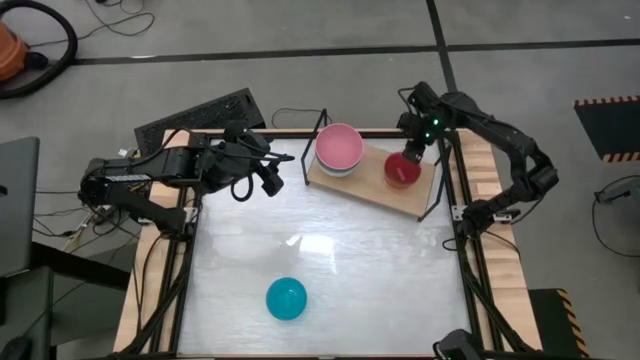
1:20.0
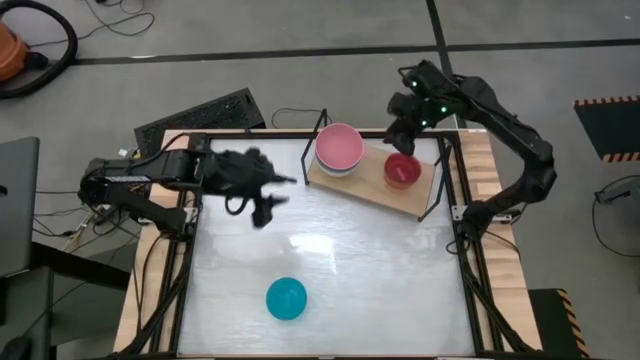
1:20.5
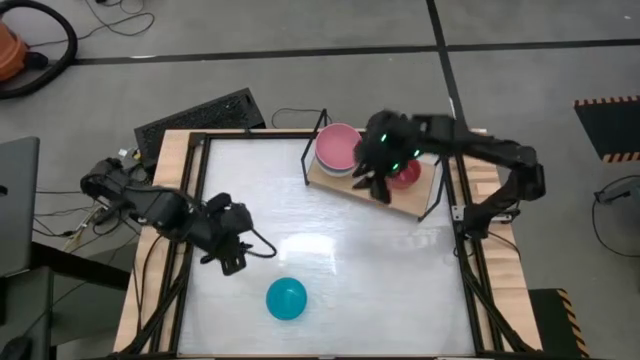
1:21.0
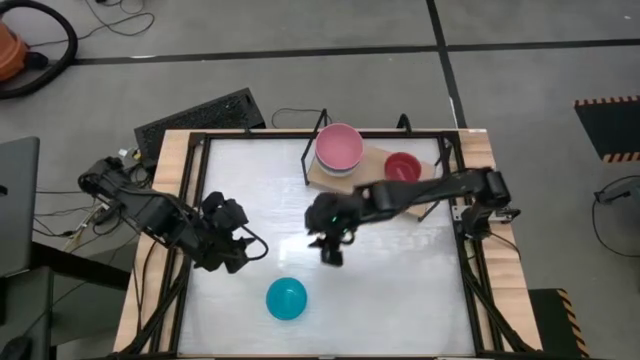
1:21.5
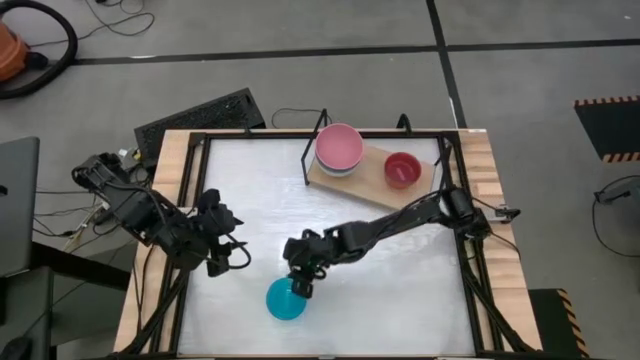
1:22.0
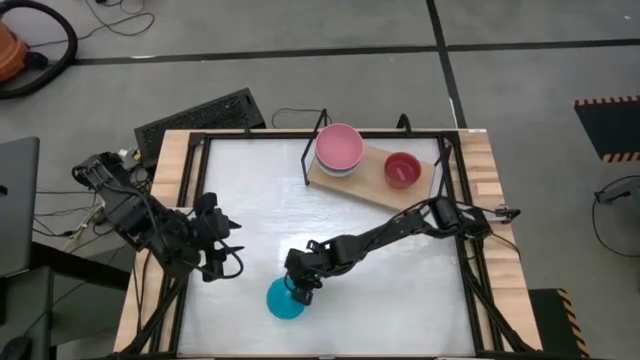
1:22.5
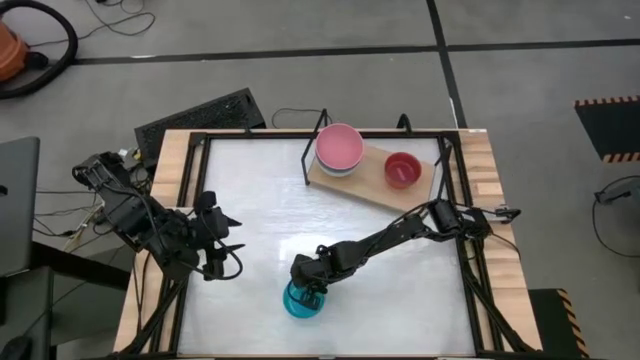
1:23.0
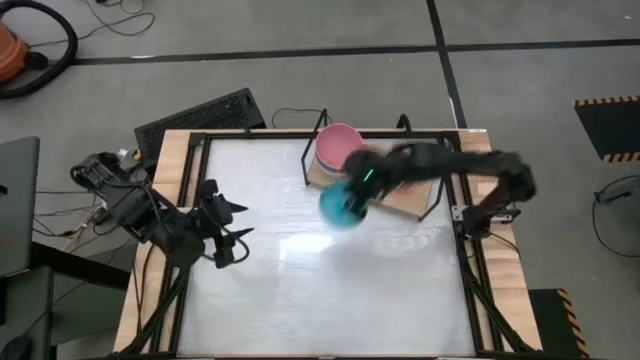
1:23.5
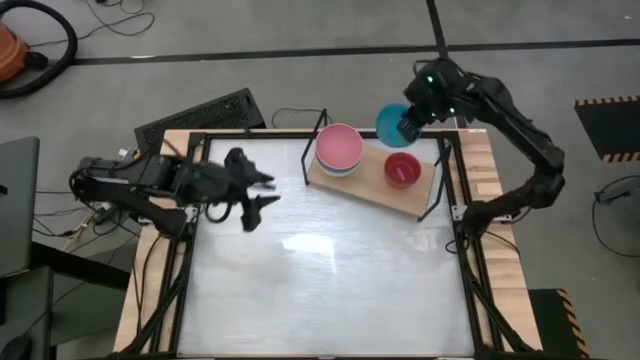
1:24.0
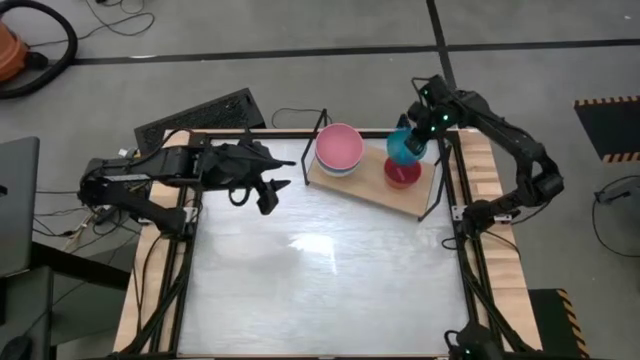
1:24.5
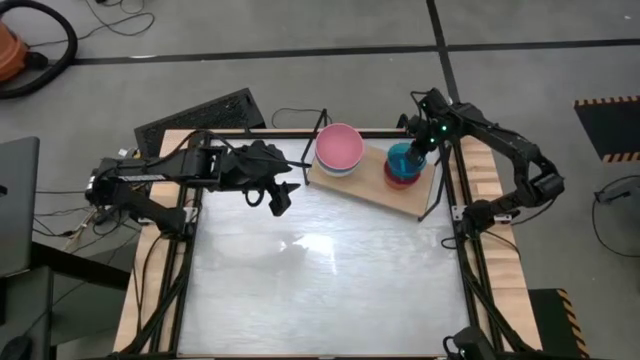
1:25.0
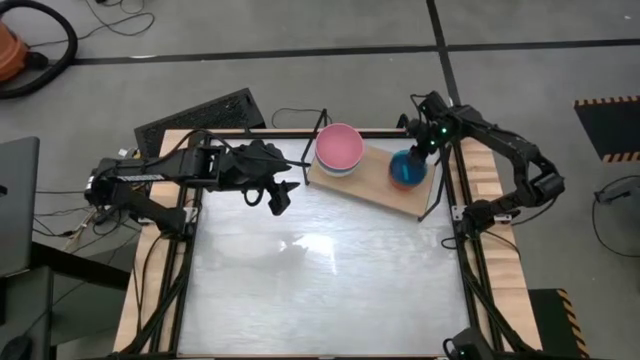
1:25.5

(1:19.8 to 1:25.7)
Task: Place and stack bowls onto a shelf
Stack the light blue bowl on top of the light pink bowl on the shelf

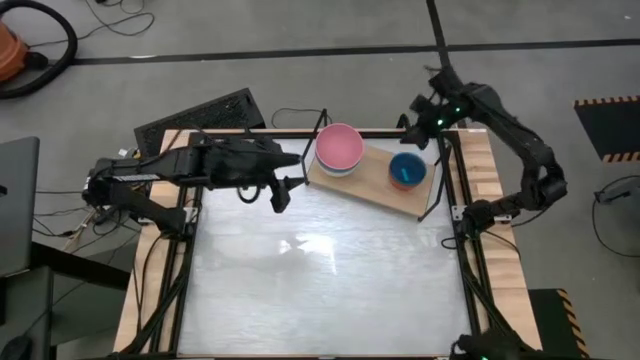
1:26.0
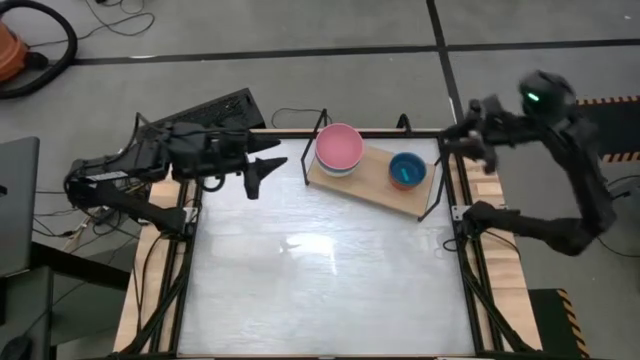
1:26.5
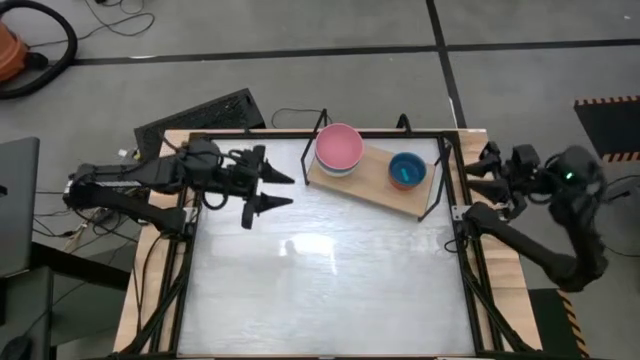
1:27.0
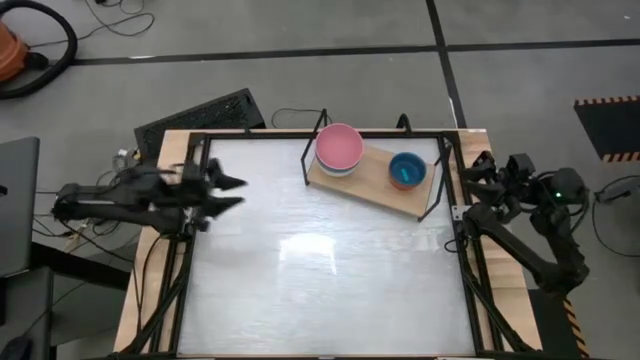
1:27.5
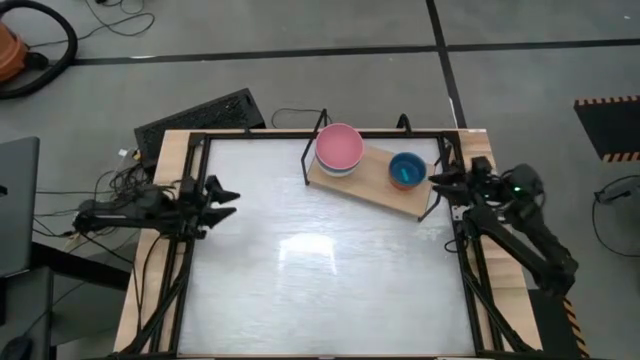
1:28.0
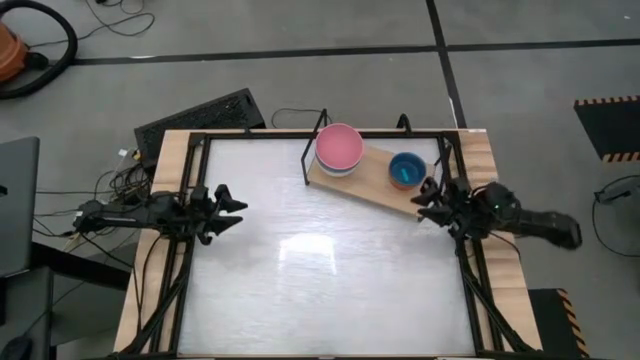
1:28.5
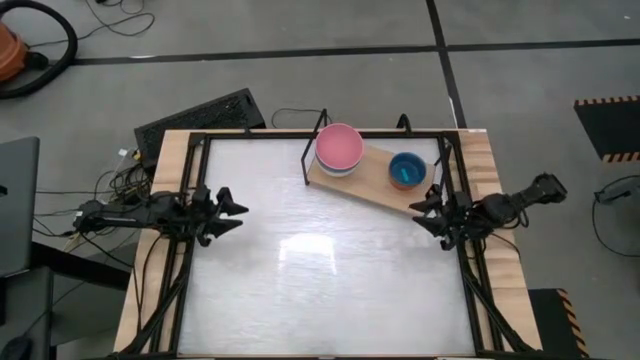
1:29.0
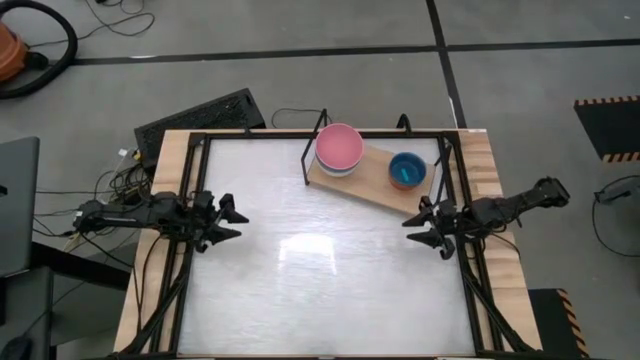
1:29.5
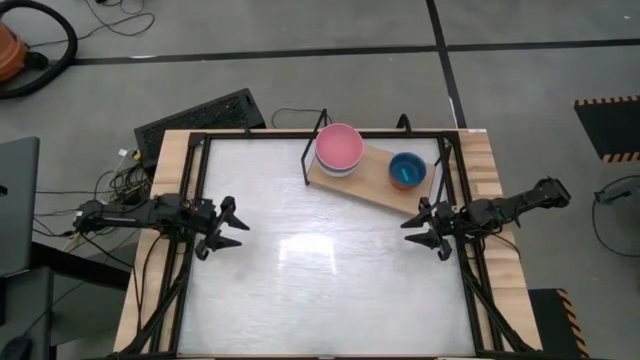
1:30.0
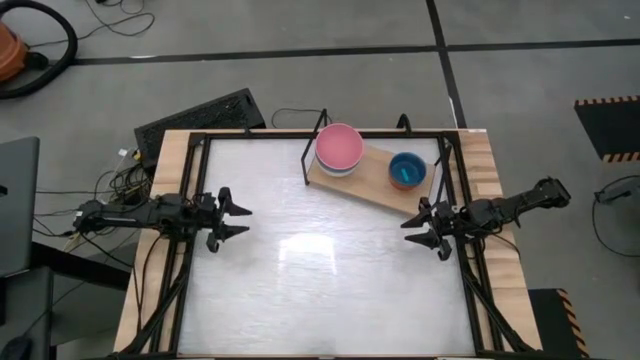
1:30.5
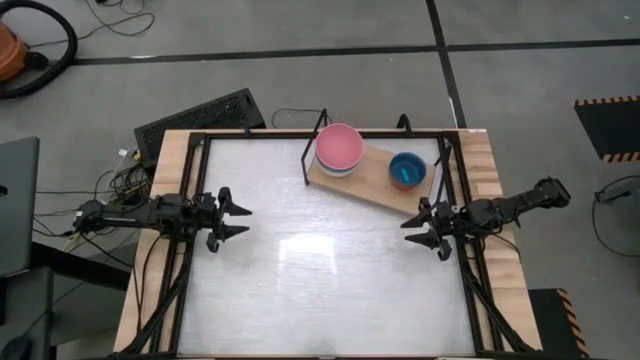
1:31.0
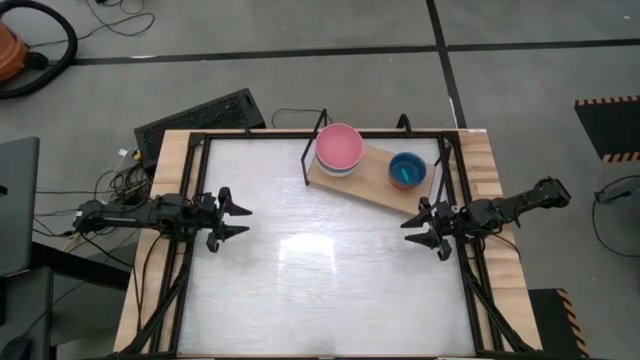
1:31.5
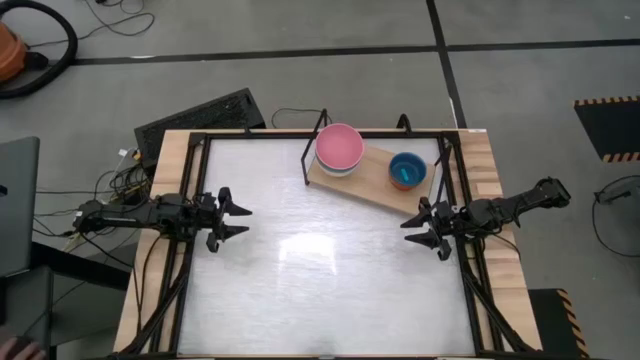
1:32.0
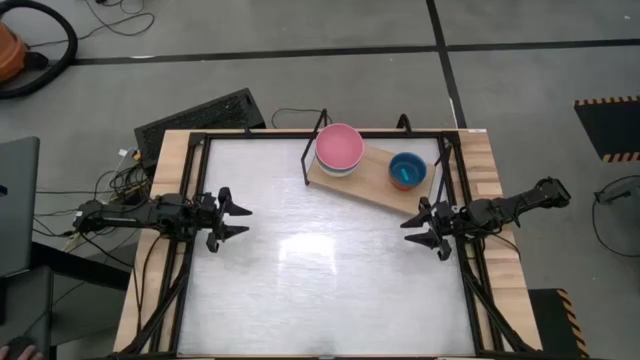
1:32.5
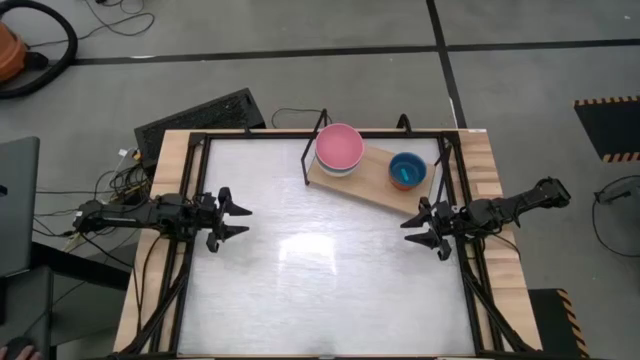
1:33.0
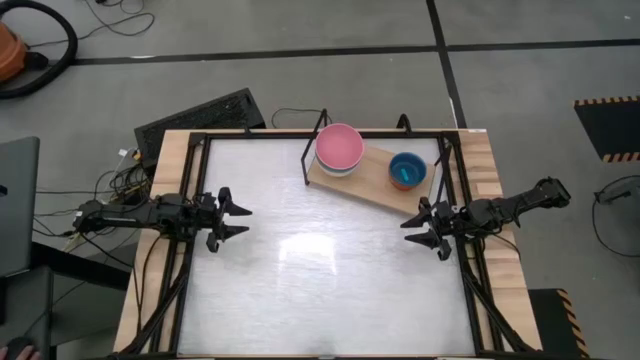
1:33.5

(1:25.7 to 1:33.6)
Return to Home Position

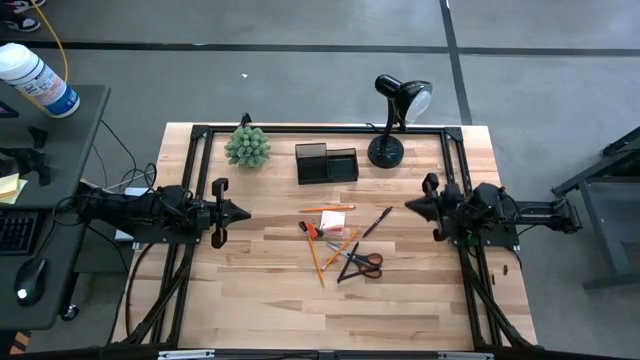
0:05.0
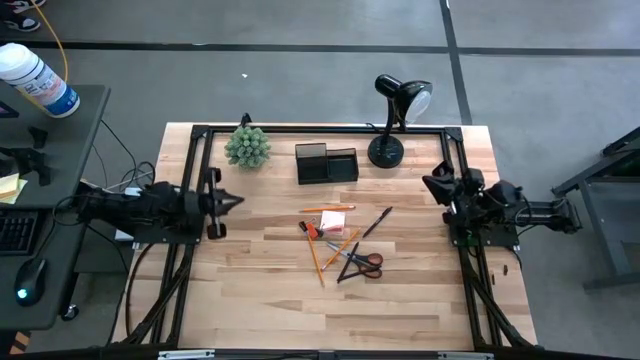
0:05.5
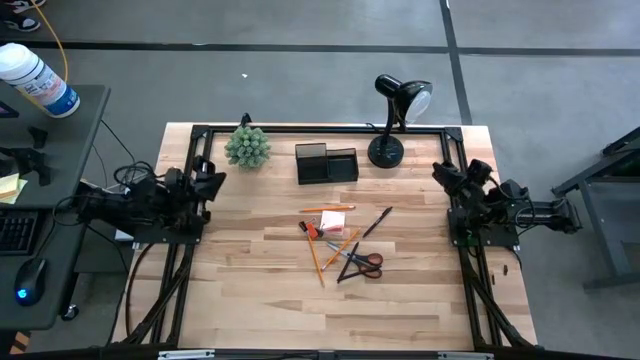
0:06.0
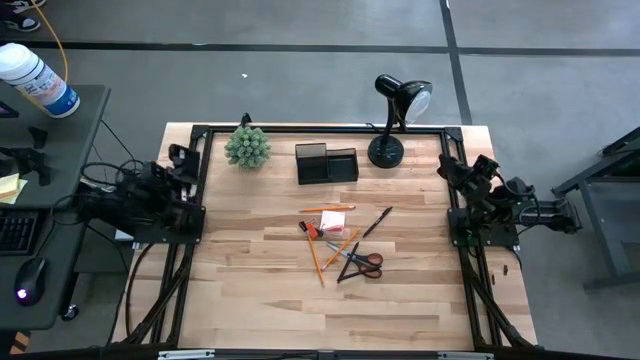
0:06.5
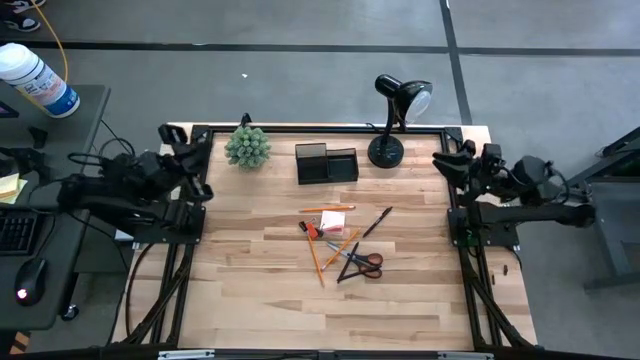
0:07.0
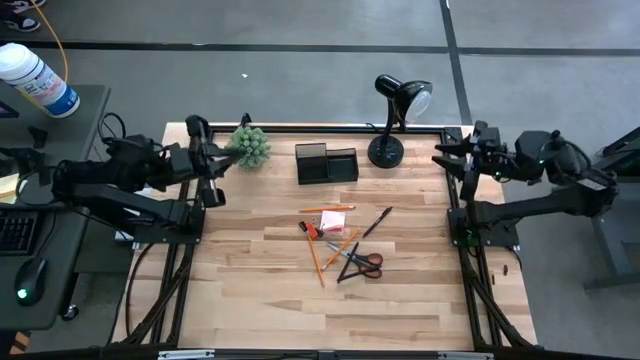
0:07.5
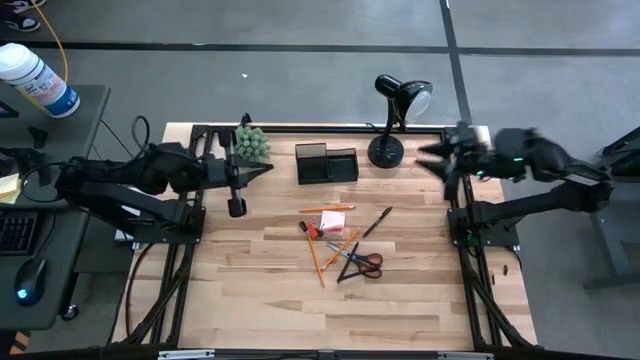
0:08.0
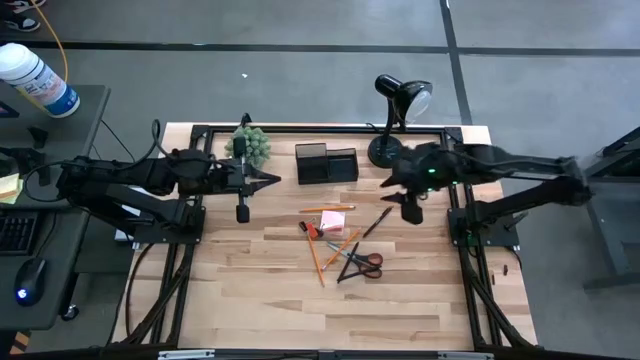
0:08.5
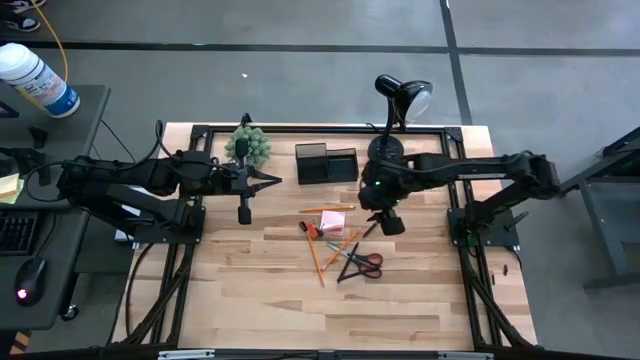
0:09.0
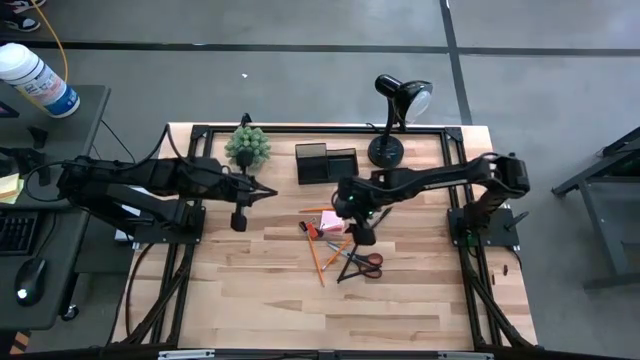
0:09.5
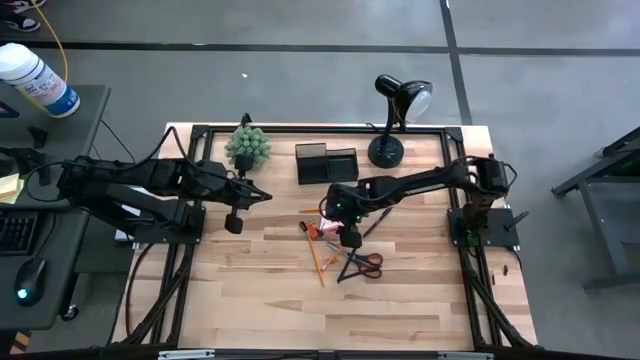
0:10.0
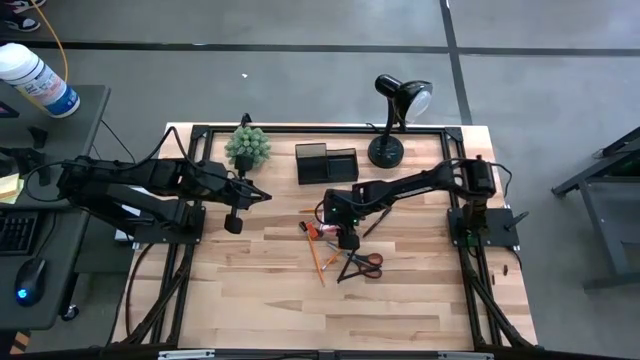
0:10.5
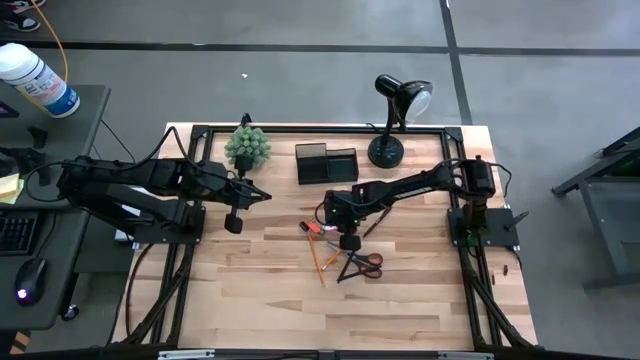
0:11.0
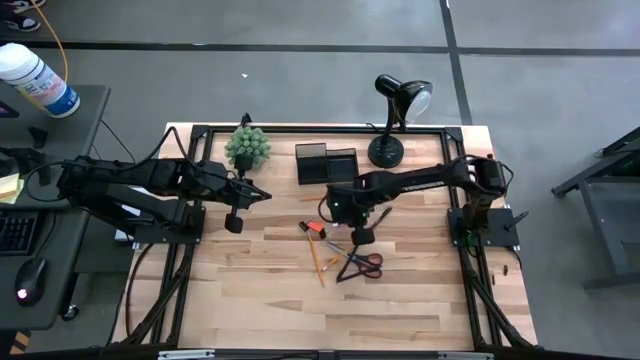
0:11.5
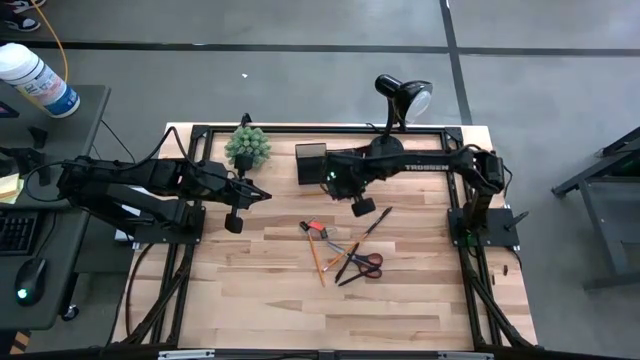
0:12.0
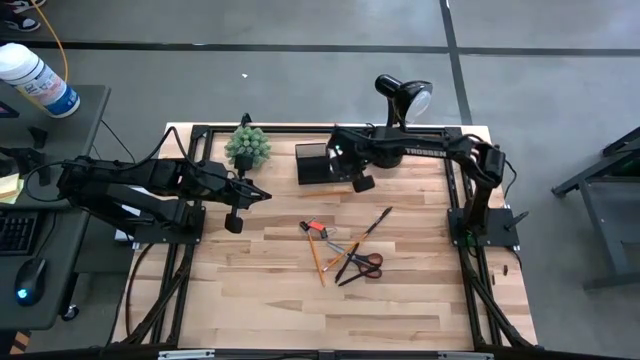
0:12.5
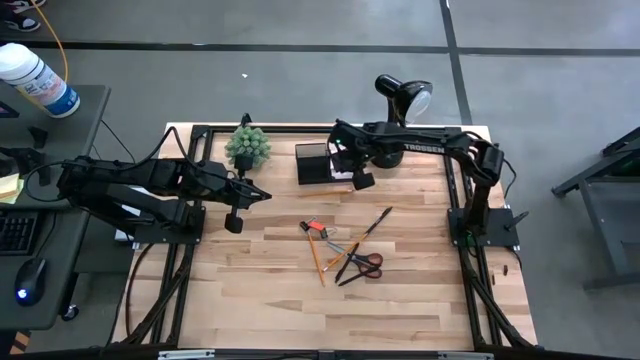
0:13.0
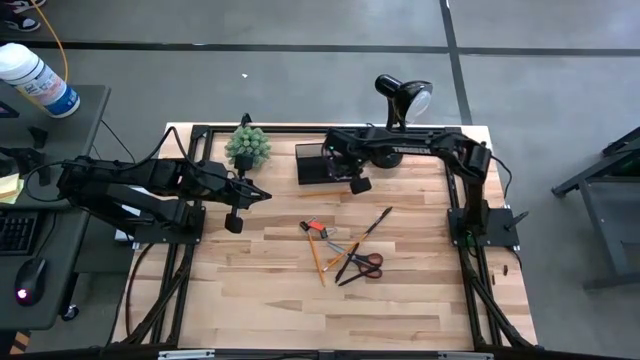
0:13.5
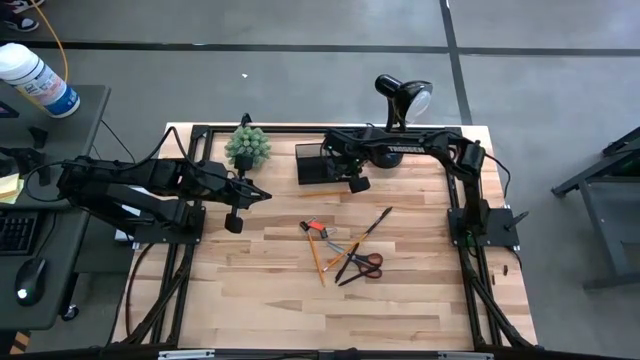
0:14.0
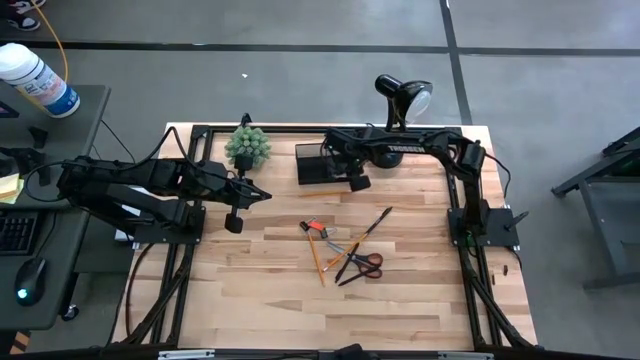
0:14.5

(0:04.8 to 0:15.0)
Task: Pick and place office supplies into organizer
Put the pink sticky notes into the black desk organizer
